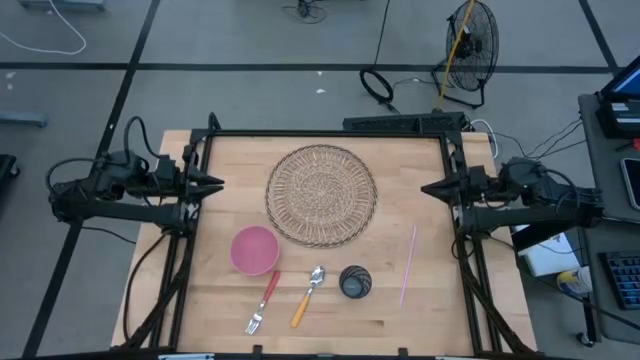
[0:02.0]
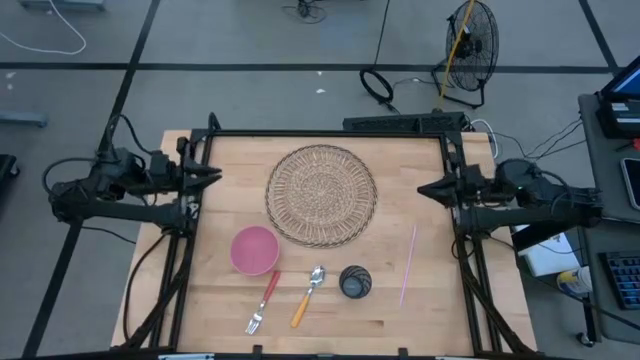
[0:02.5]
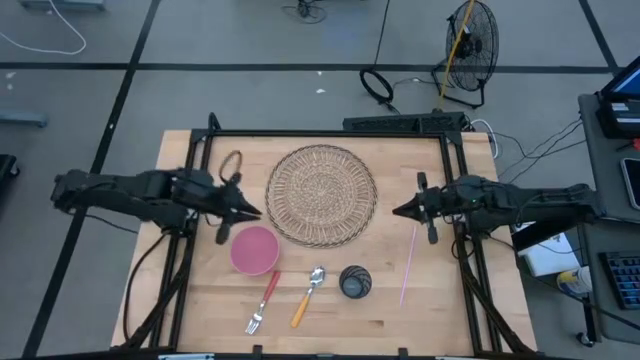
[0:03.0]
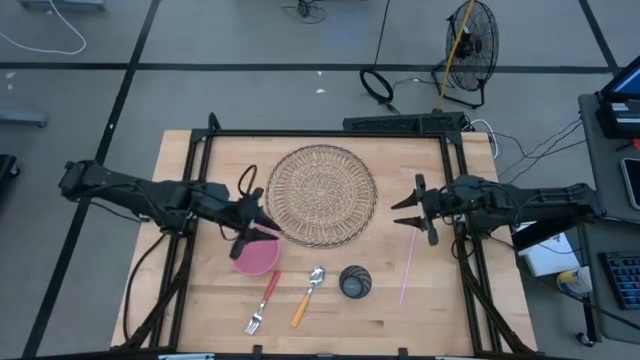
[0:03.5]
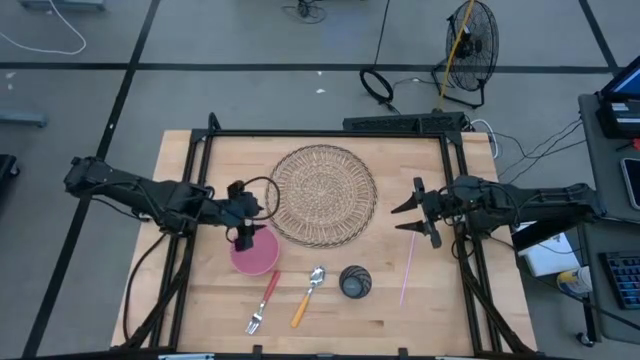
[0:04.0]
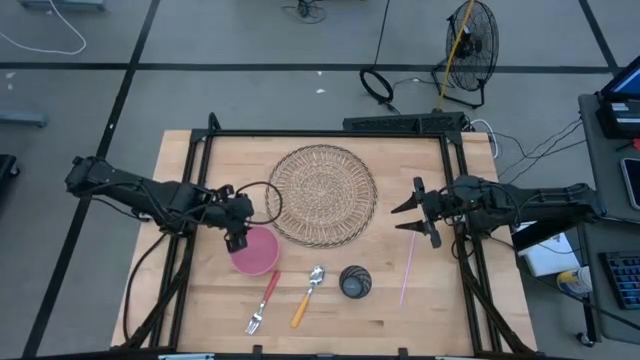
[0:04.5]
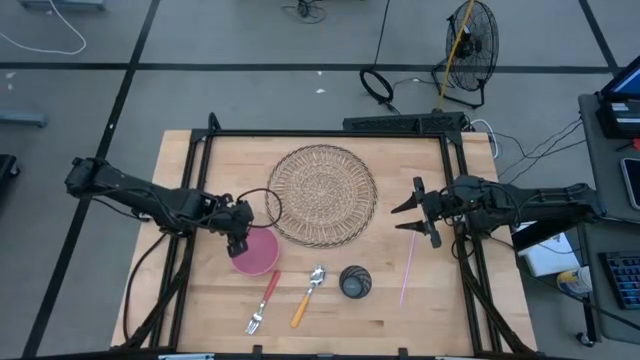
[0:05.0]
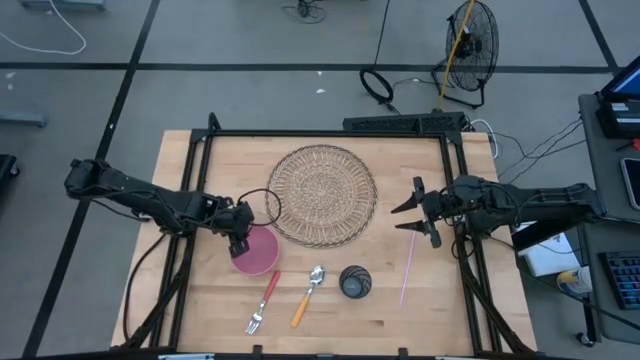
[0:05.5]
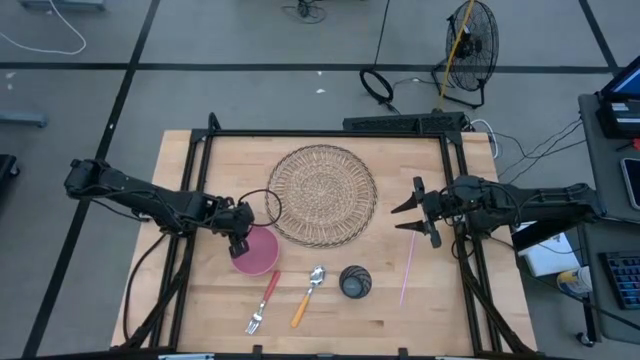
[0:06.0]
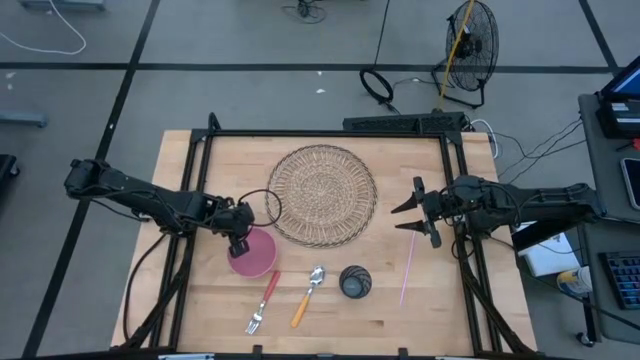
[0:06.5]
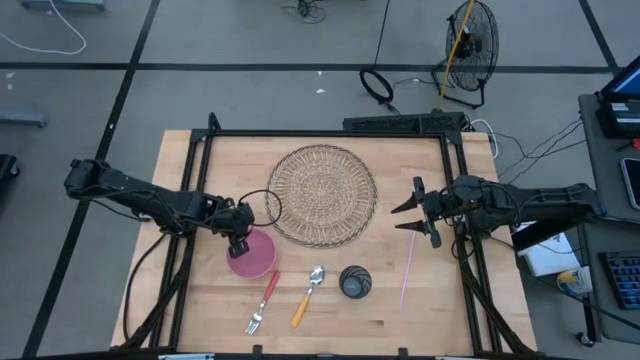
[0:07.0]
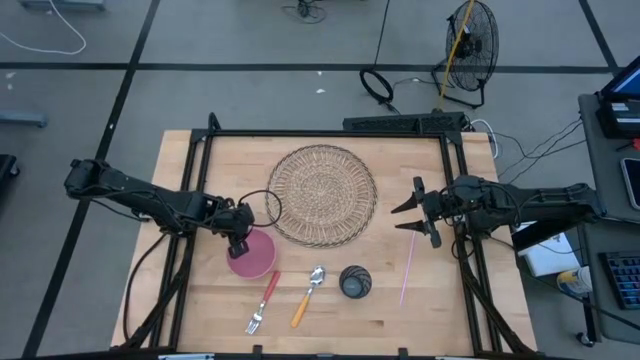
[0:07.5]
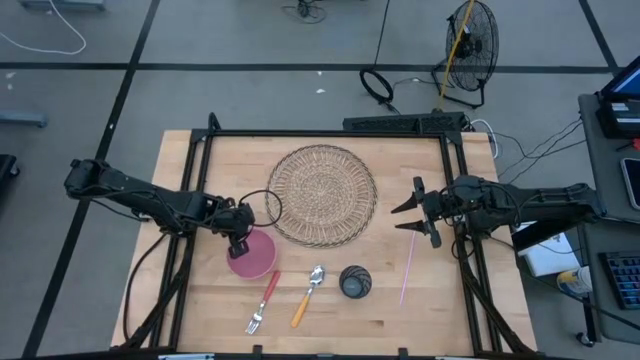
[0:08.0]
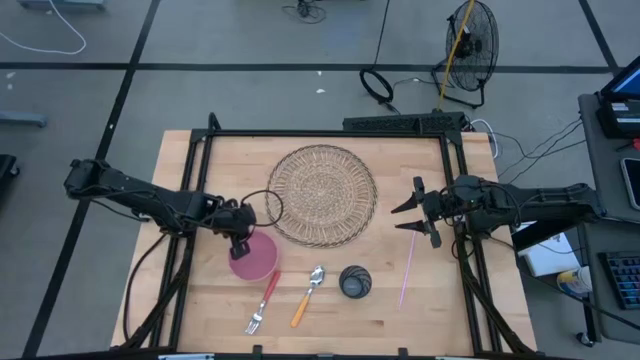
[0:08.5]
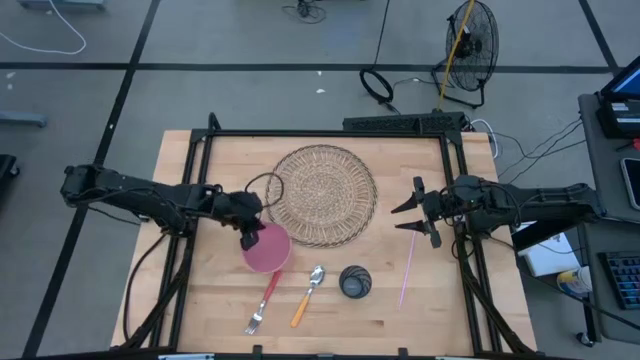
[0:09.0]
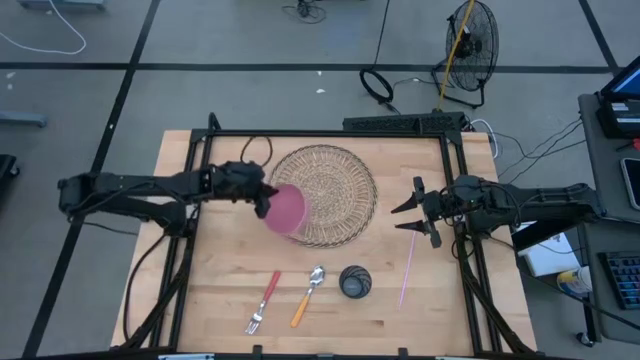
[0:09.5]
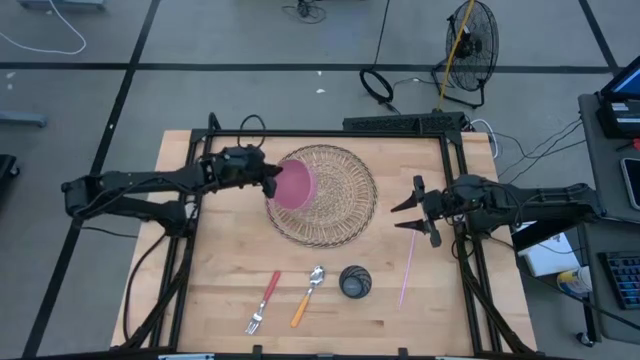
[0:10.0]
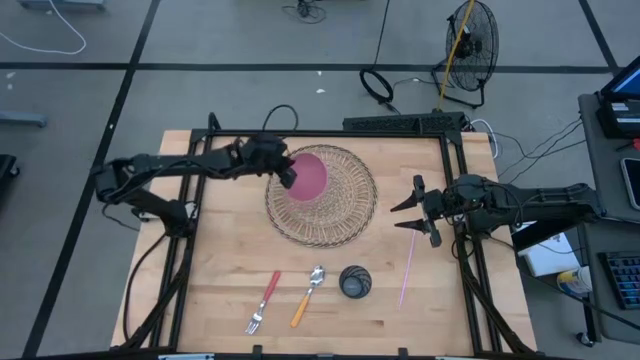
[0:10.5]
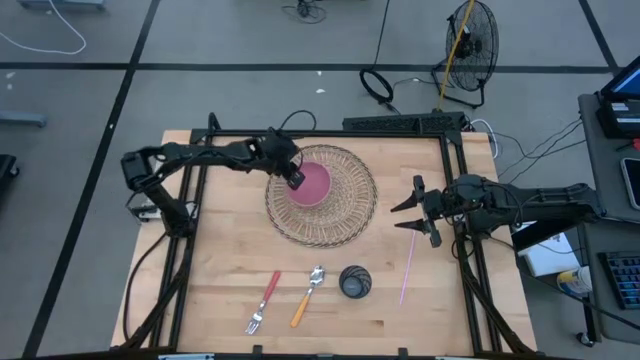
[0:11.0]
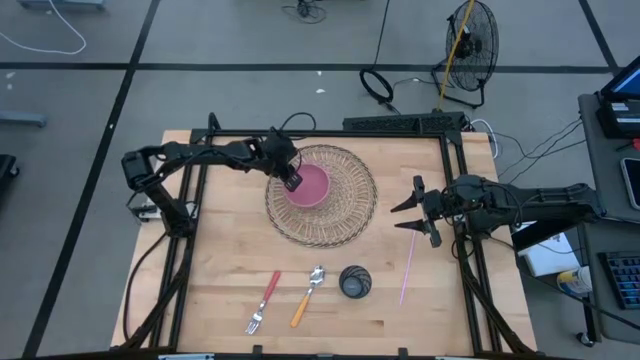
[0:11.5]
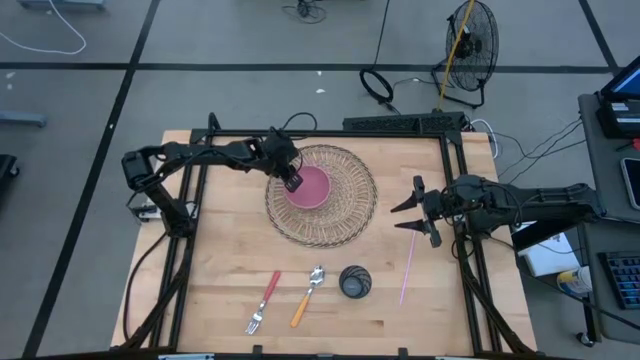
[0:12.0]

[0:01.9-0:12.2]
Task: Pick & Place Utensil
Put the pink bowl on the woven mat

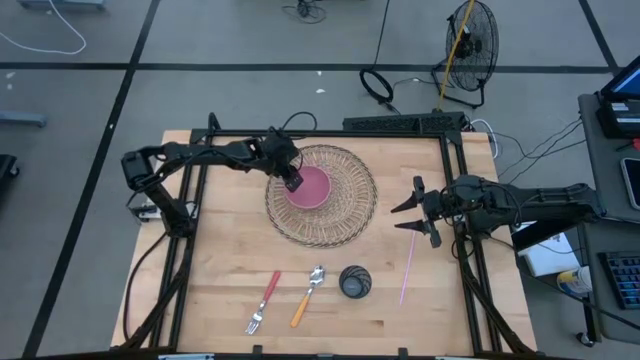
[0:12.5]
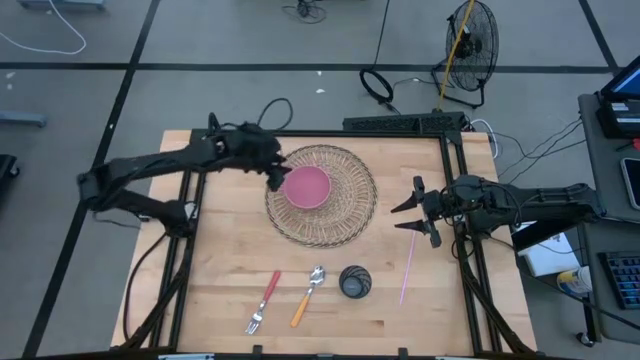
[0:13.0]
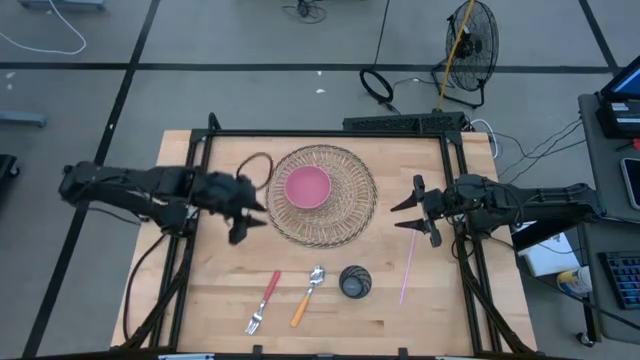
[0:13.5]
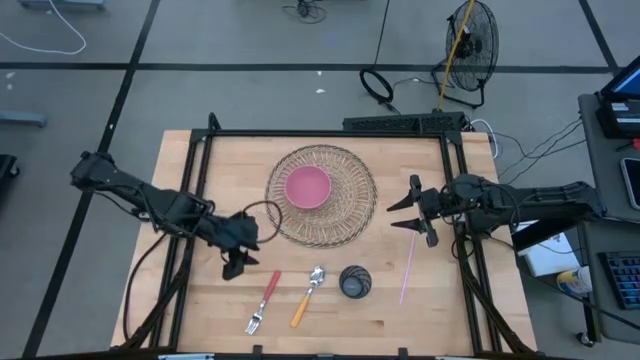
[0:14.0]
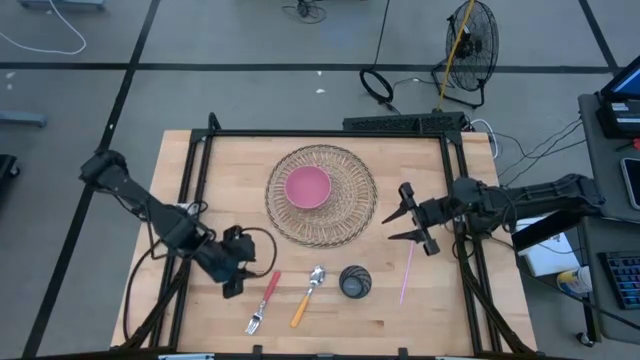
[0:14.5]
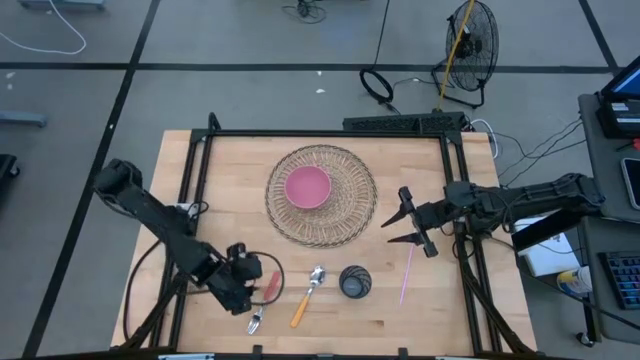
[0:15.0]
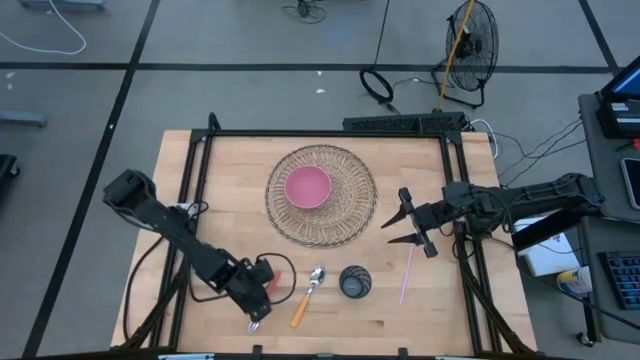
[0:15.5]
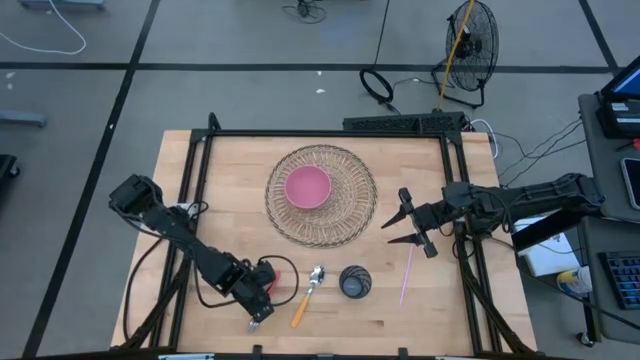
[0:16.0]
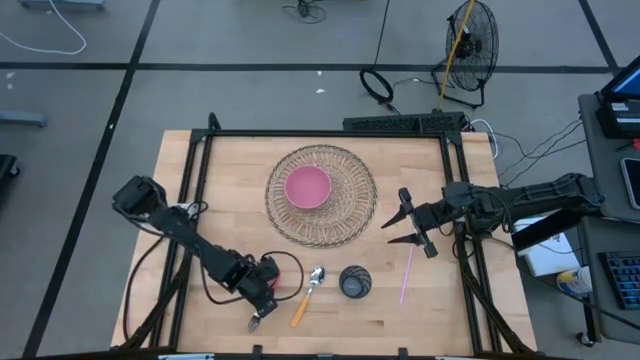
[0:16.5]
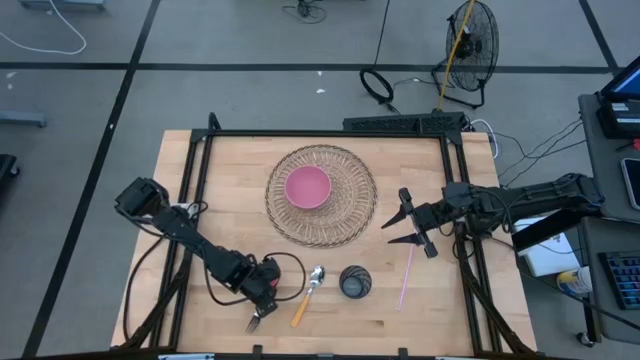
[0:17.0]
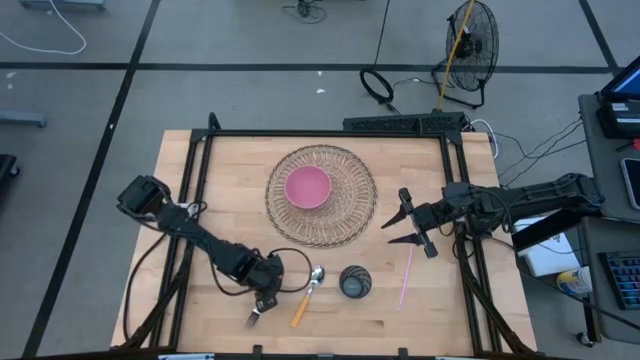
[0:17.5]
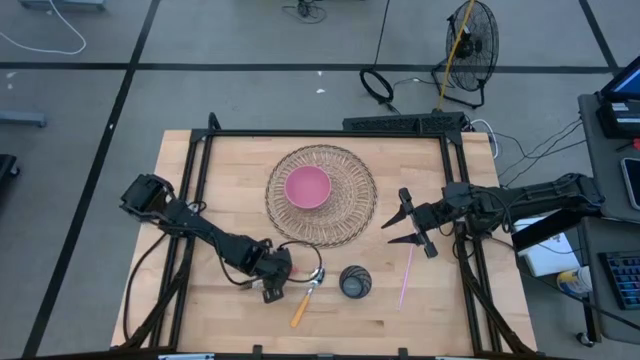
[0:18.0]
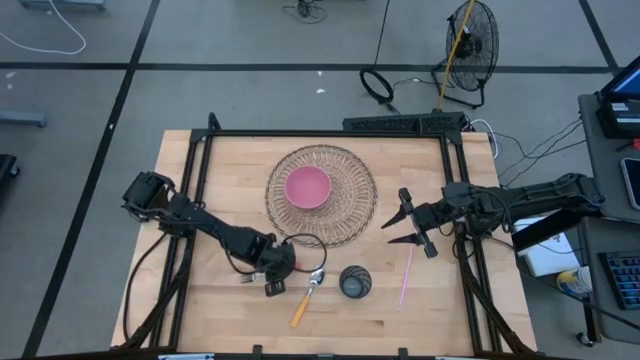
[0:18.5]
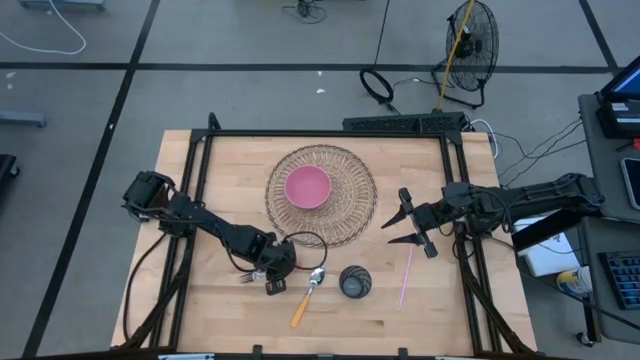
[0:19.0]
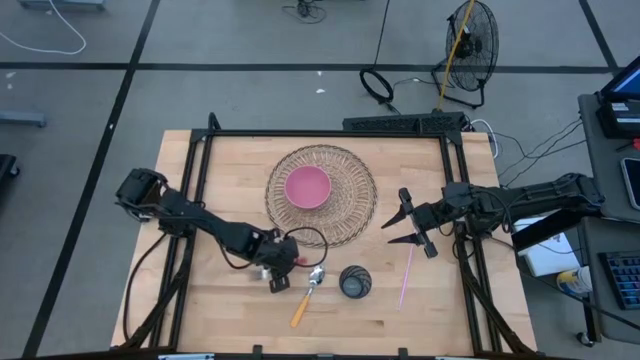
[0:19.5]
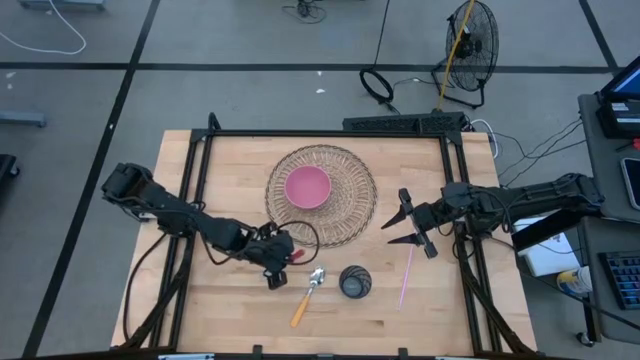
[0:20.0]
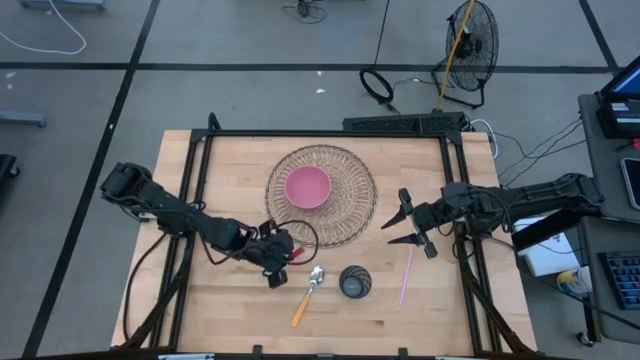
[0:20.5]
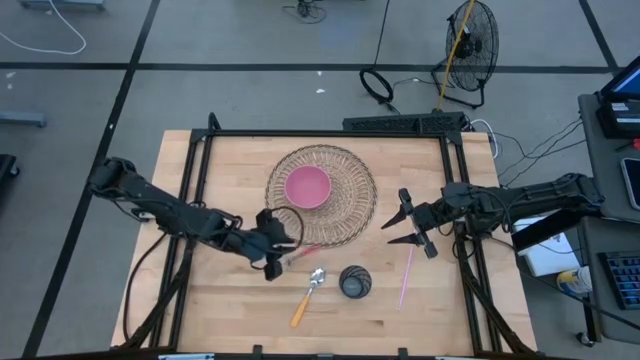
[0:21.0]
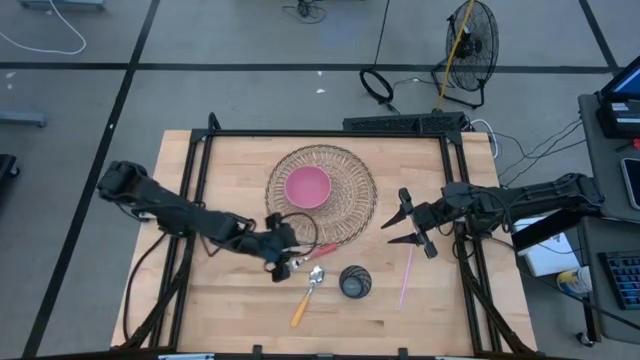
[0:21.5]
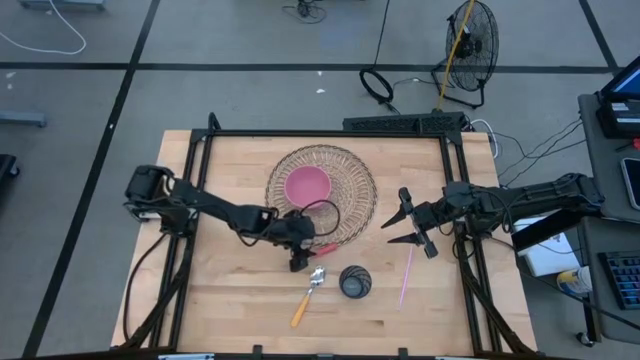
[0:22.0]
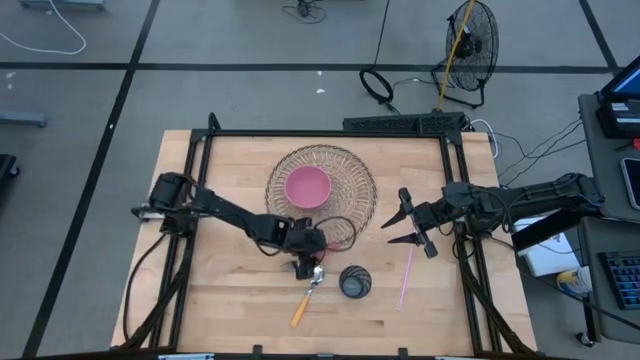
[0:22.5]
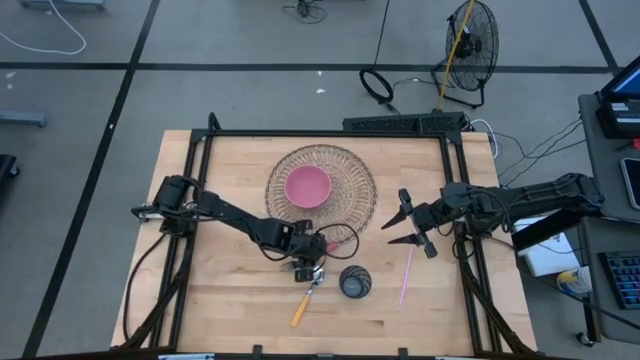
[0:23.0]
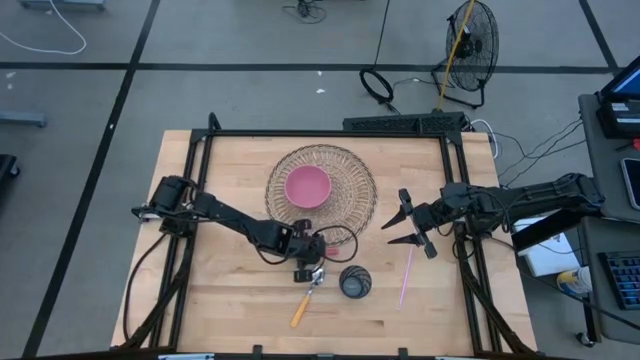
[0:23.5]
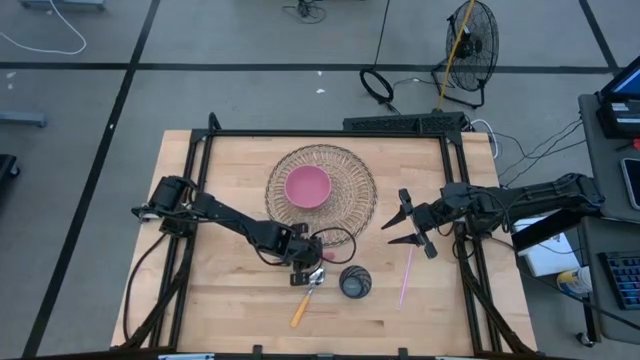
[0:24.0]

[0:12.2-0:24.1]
Put the red fork into the pink bowl on the woven mat
